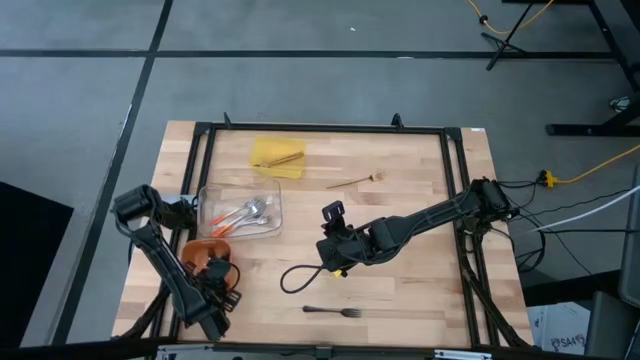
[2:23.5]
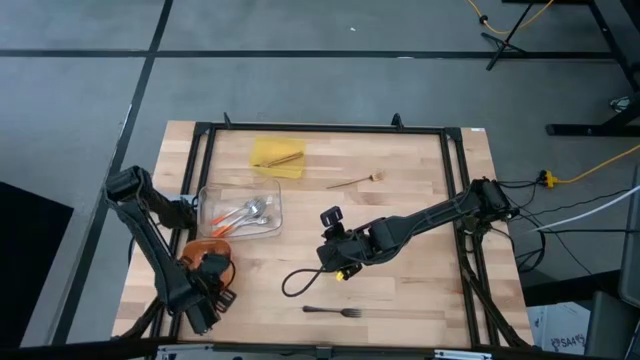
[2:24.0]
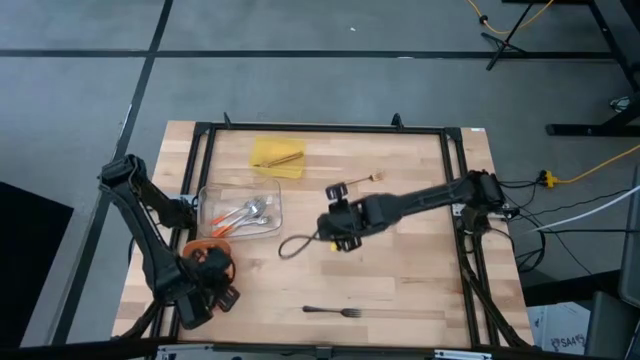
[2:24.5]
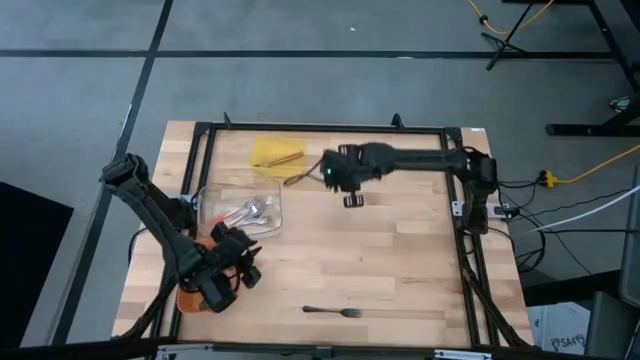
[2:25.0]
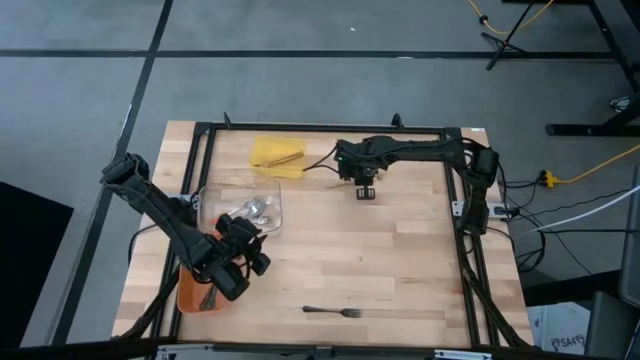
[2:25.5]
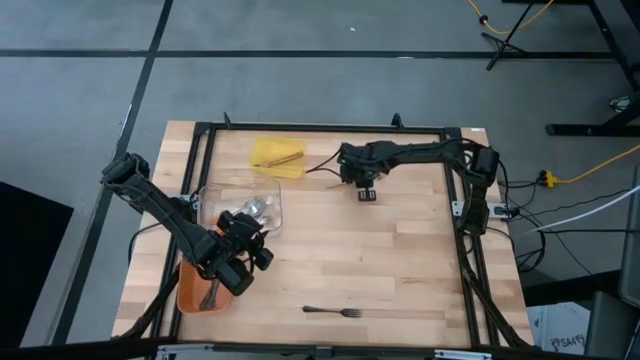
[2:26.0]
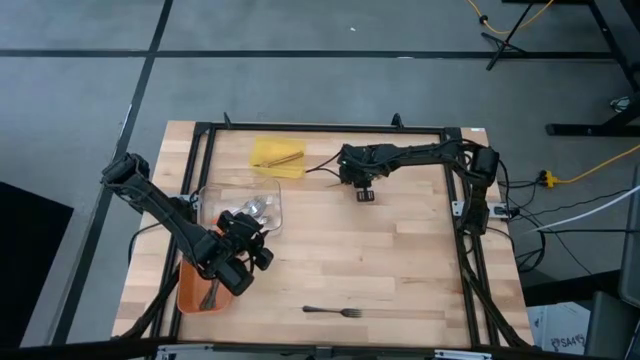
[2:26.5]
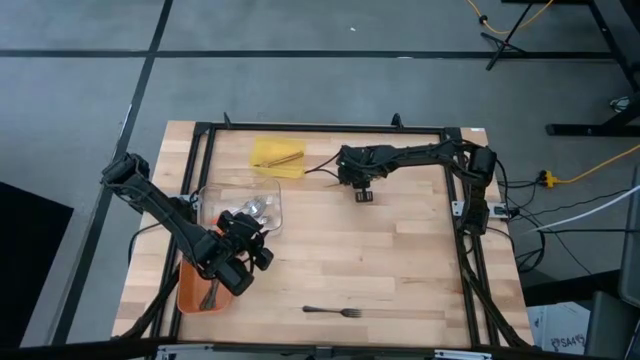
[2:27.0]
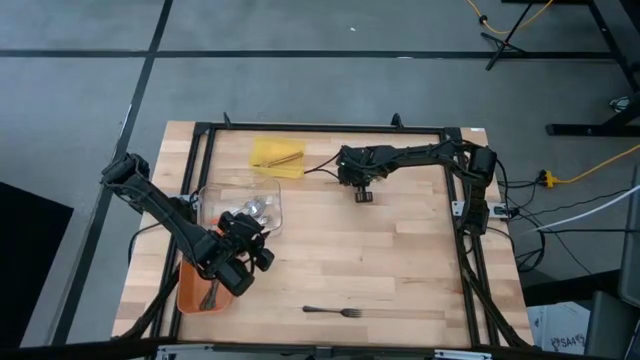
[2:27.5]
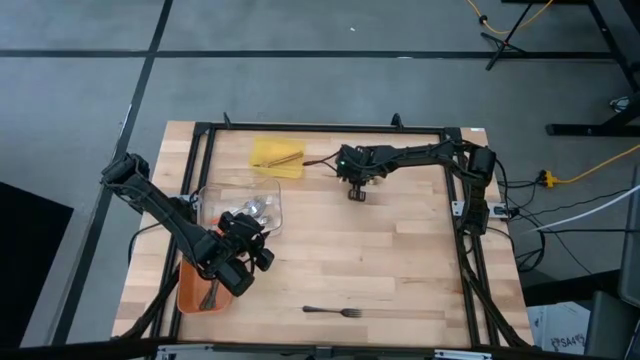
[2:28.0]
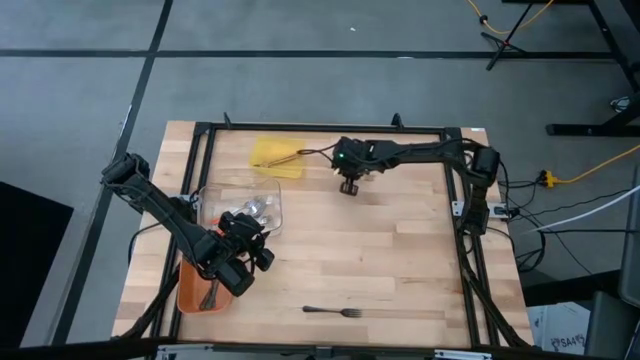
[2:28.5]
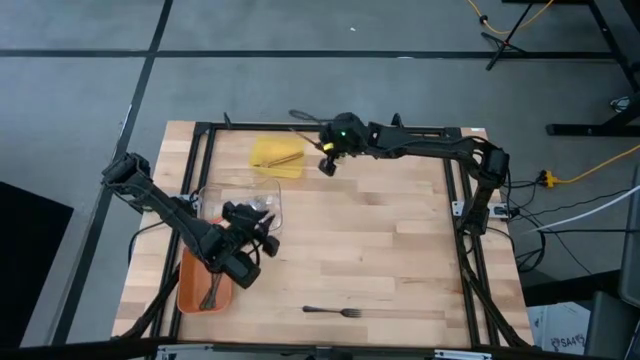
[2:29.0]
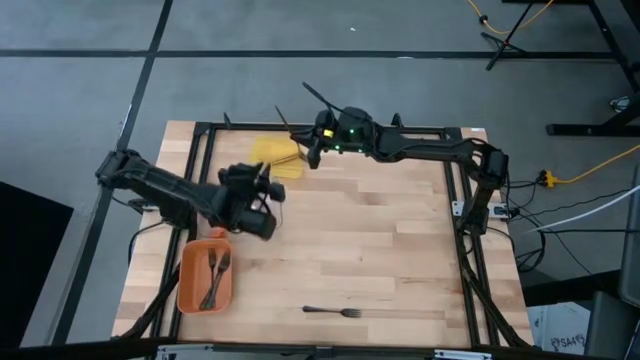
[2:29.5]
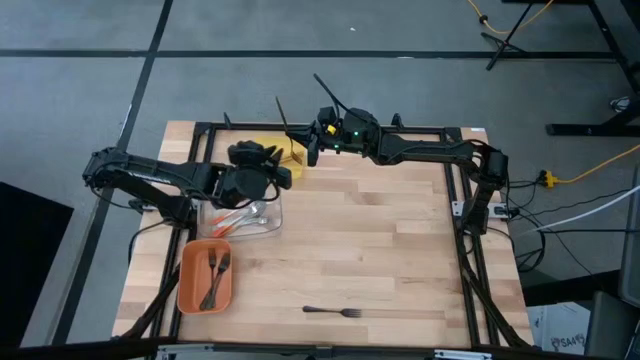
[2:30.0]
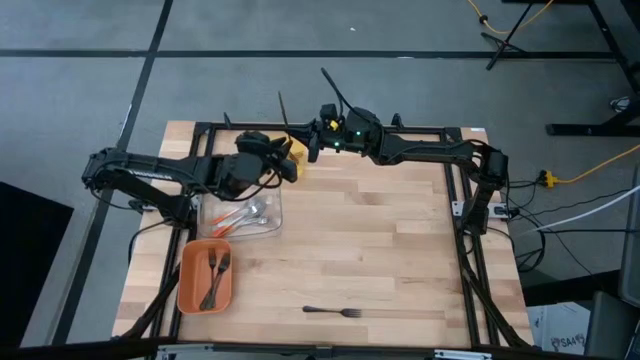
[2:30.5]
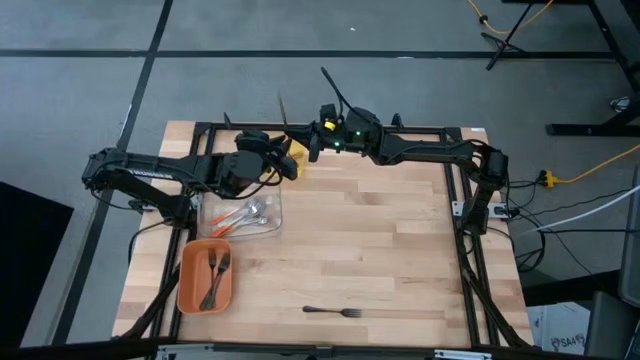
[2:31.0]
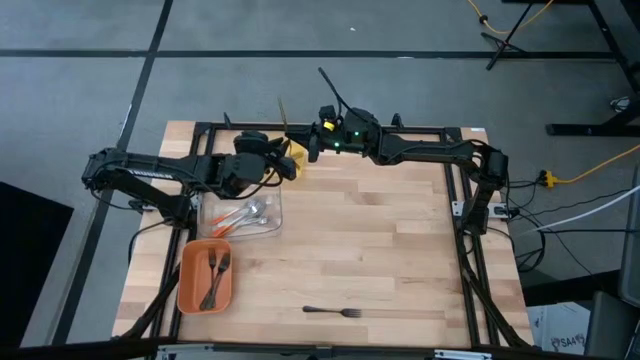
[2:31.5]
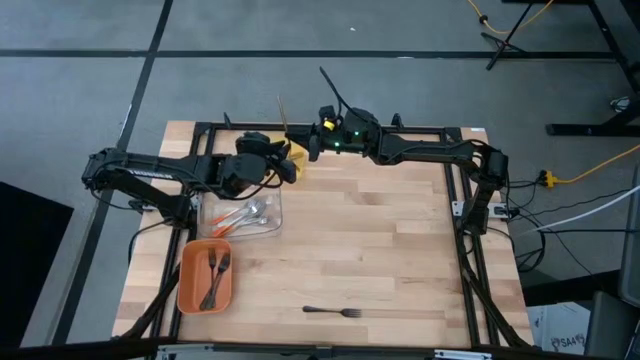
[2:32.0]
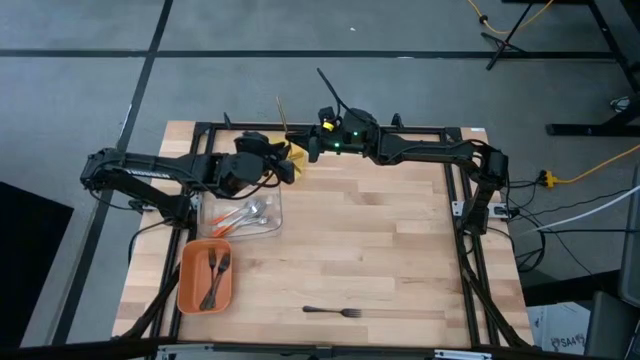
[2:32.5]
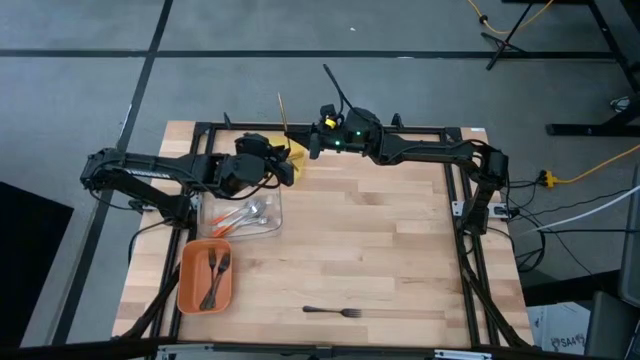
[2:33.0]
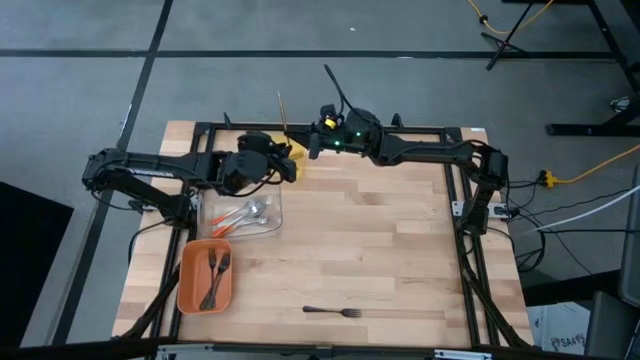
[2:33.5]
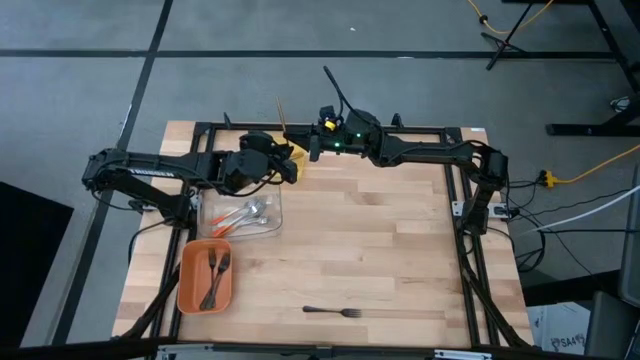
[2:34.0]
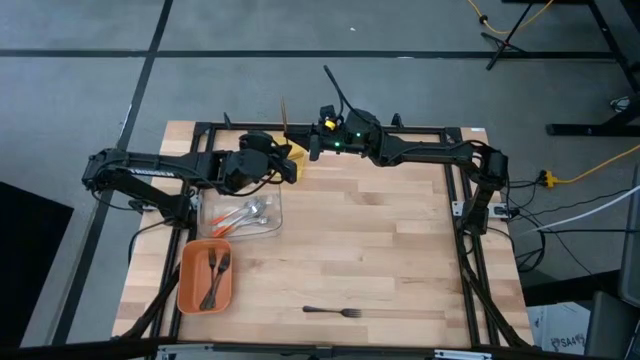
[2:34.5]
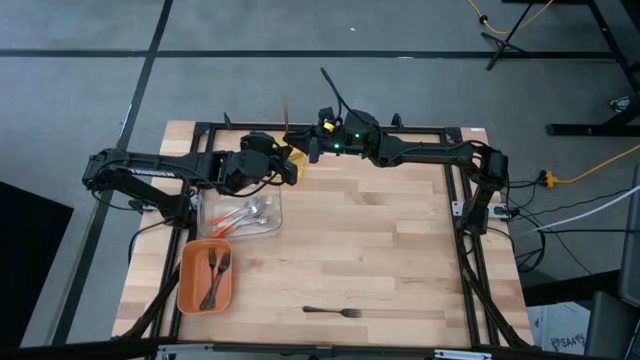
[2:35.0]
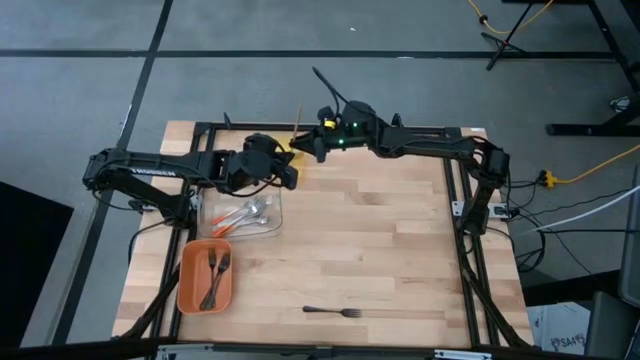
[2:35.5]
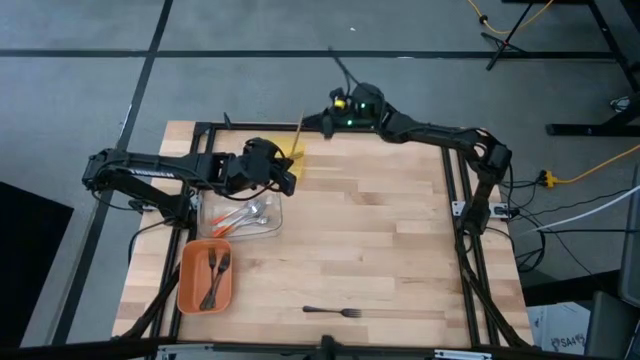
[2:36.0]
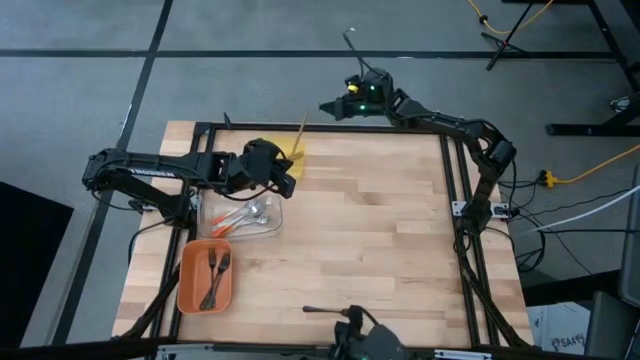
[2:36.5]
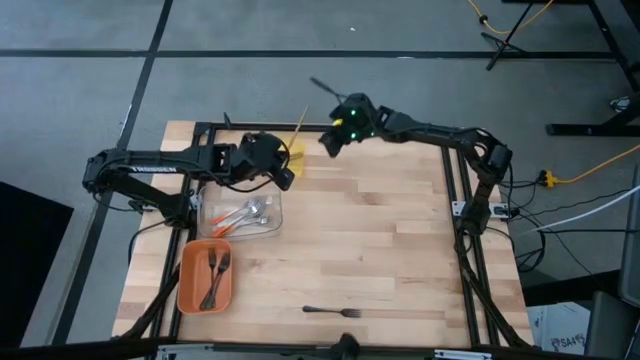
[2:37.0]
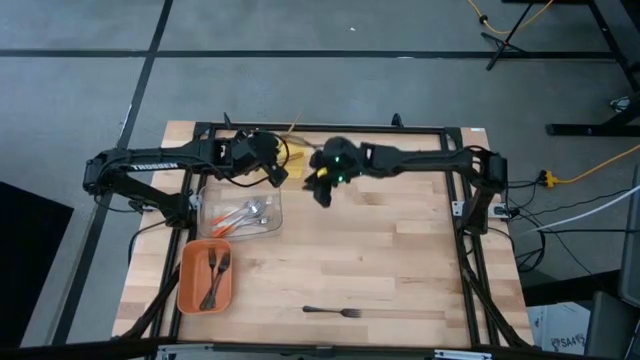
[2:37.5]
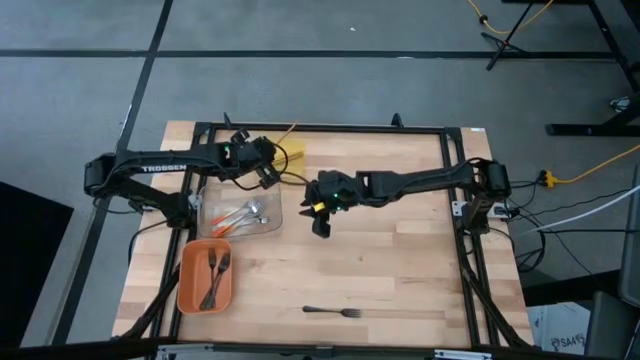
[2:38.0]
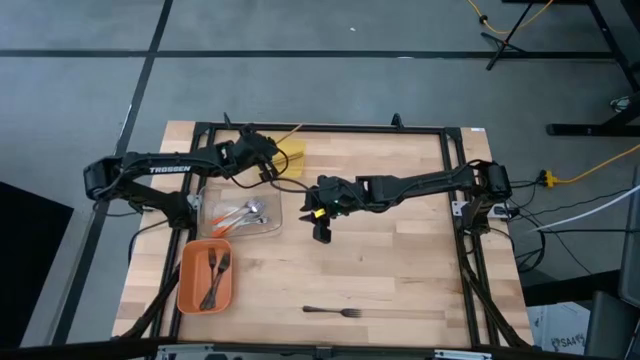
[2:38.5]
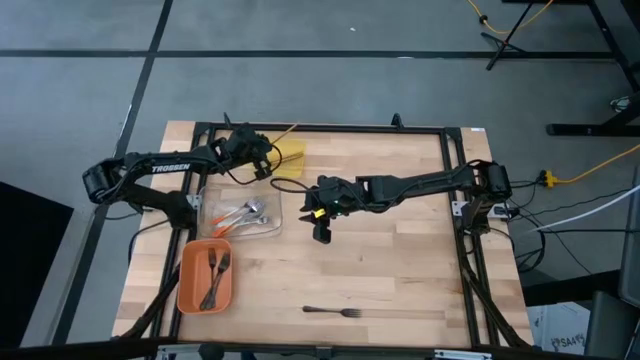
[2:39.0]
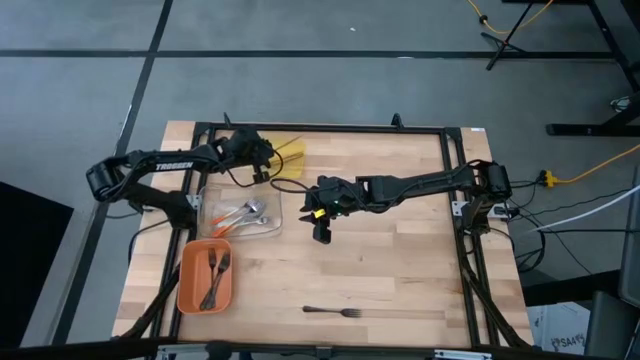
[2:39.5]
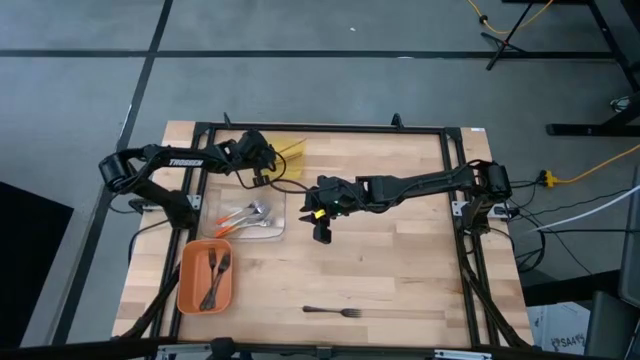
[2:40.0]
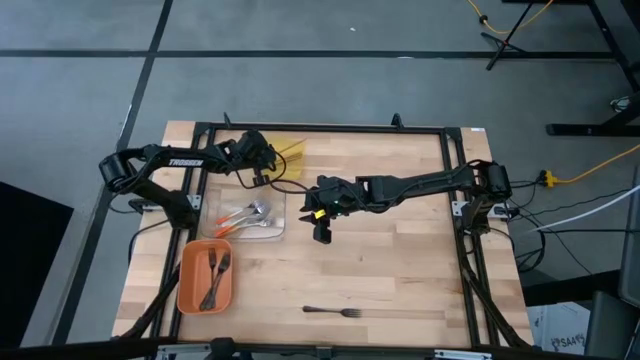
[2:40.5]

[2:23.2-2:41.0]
Task: Sort silverware by color (type)
Put the gold fork into the yellow bin

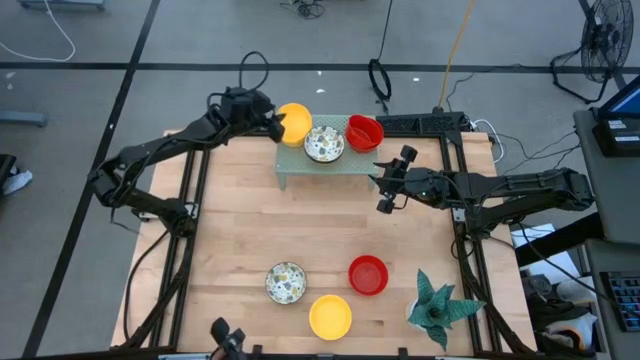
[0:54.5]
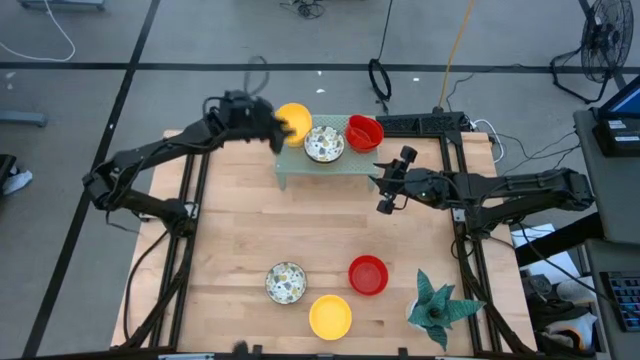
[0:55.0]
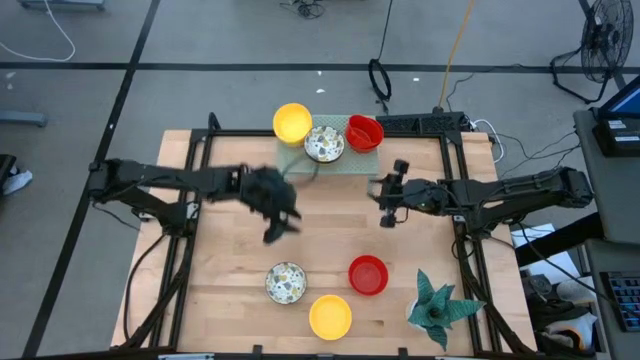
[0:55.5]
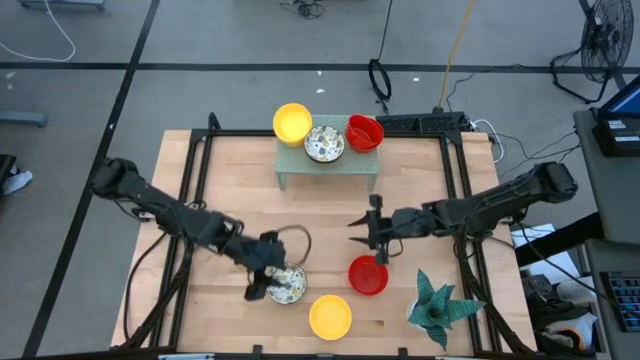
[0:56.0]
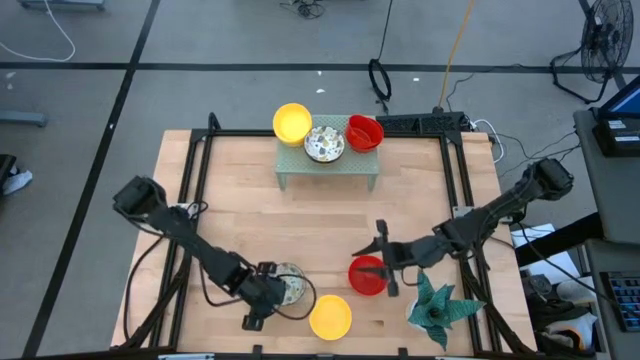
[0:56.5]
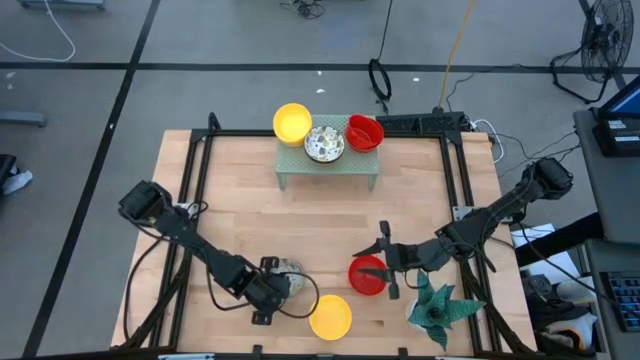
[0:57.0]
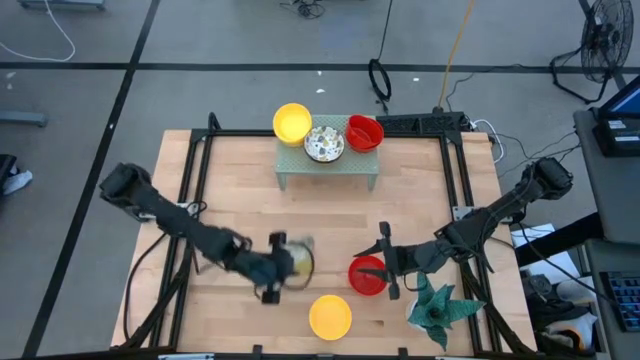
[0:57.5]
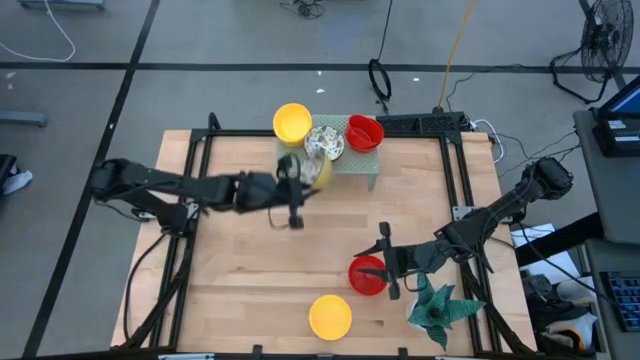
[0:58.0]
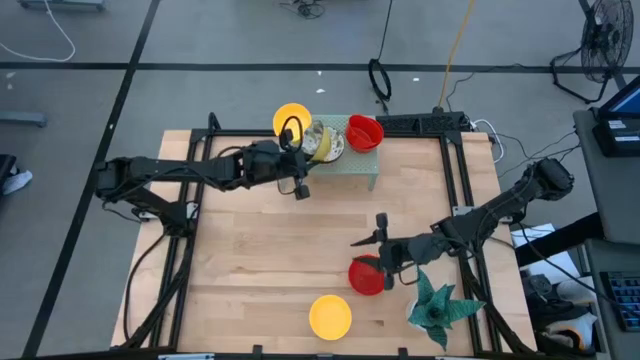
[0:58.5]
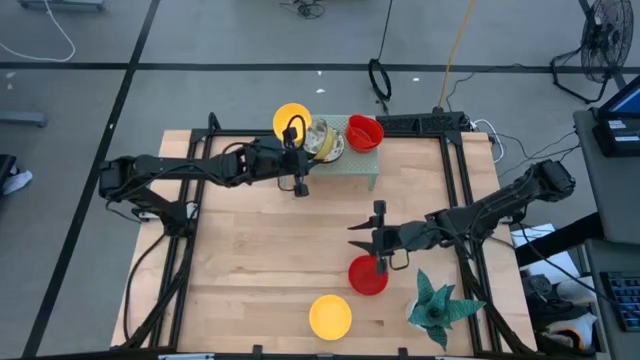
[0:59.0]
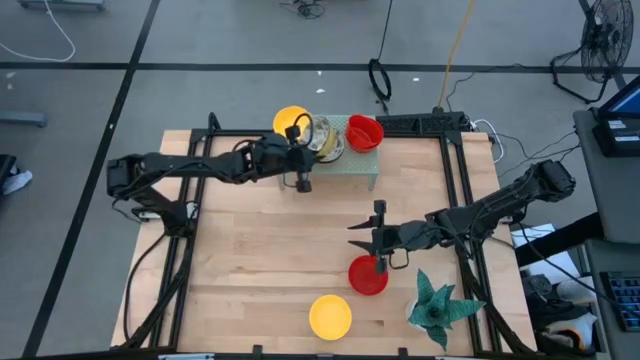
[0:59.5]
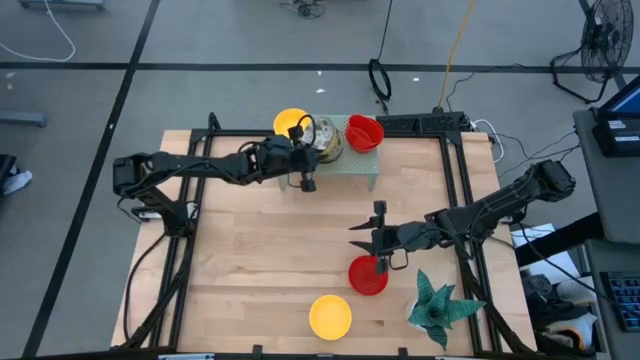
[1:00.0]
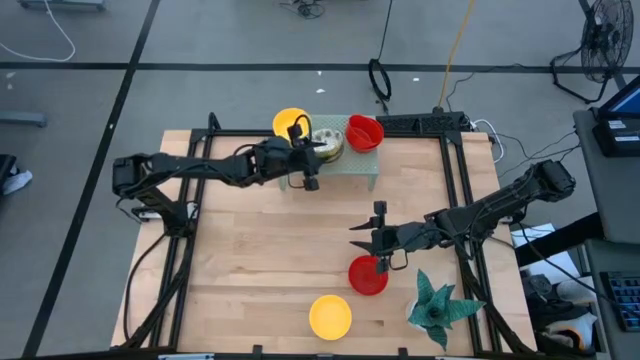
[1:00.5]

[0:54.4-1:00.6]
Task: Pick & Place Mini bowls
Stack the white bowl on top of the white bowl on the shelf
